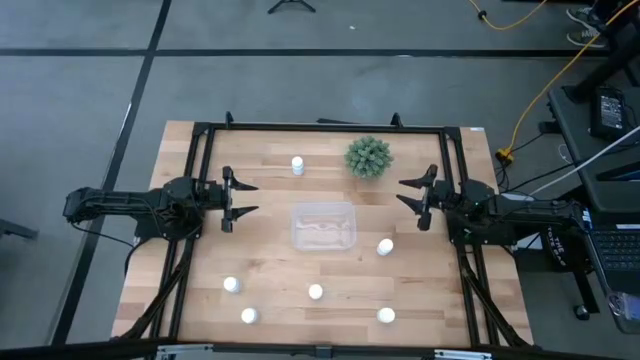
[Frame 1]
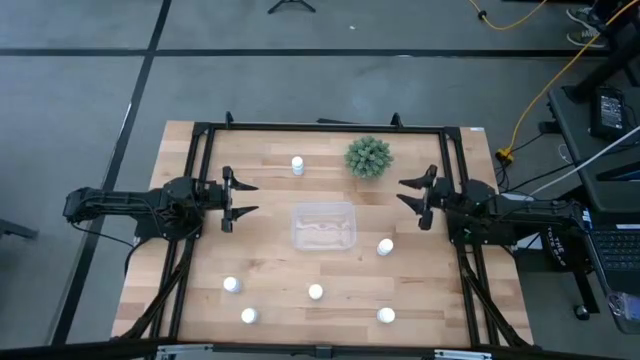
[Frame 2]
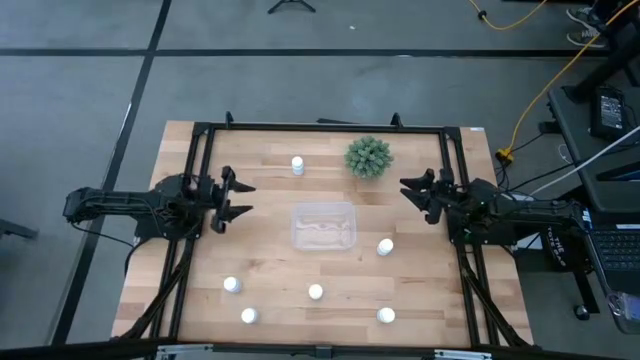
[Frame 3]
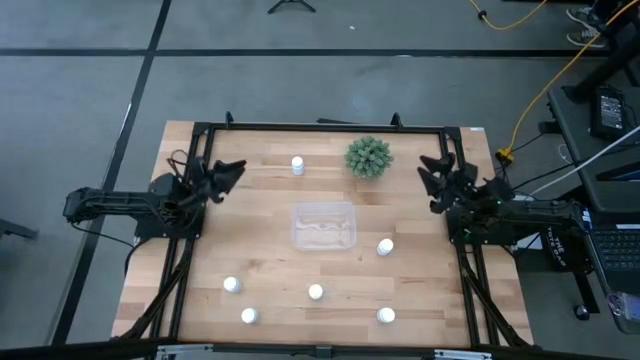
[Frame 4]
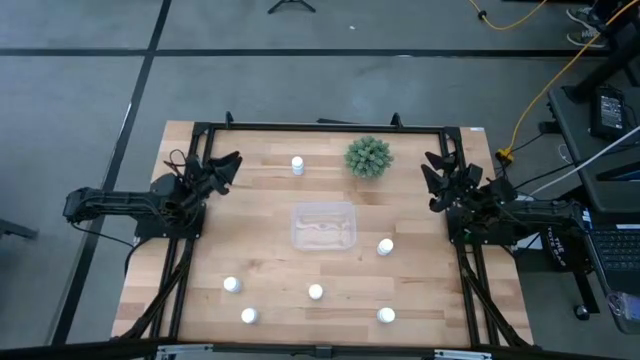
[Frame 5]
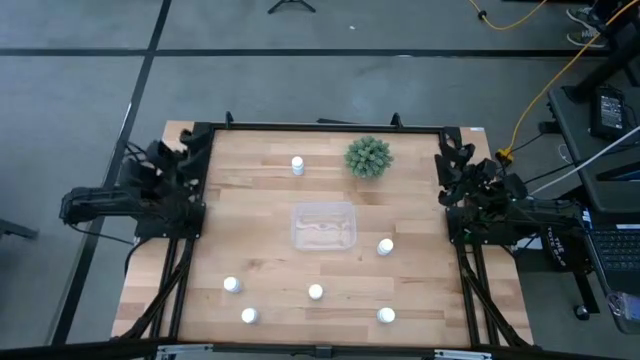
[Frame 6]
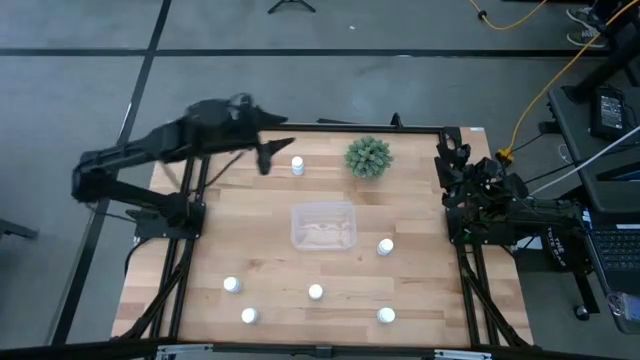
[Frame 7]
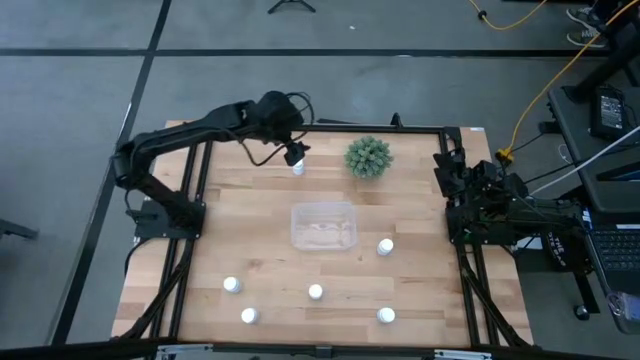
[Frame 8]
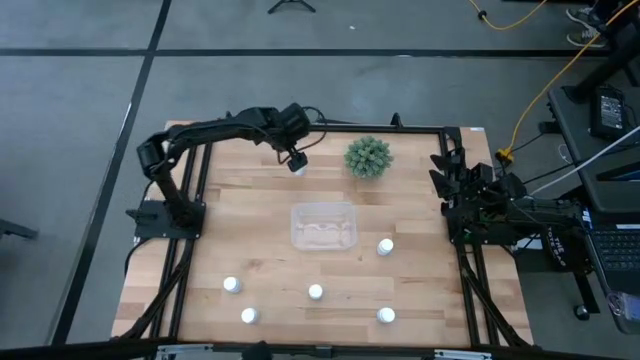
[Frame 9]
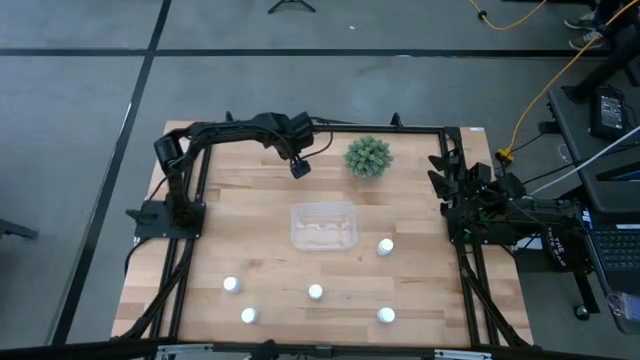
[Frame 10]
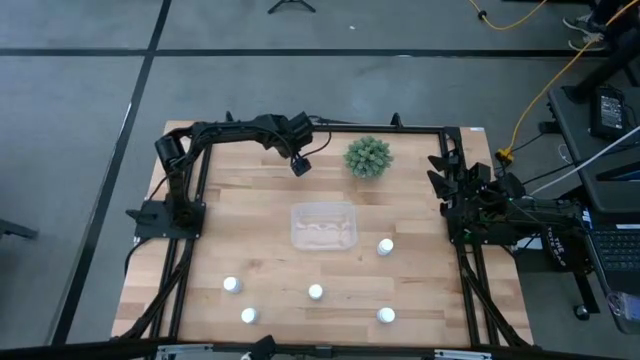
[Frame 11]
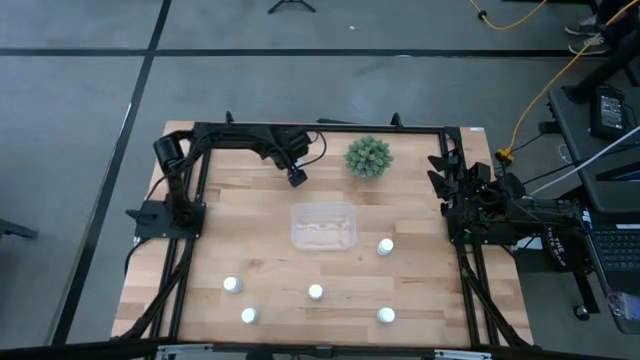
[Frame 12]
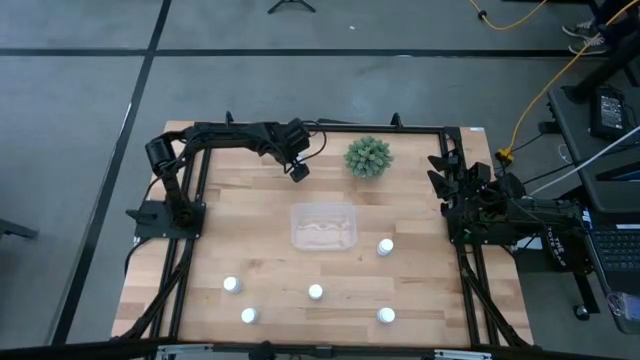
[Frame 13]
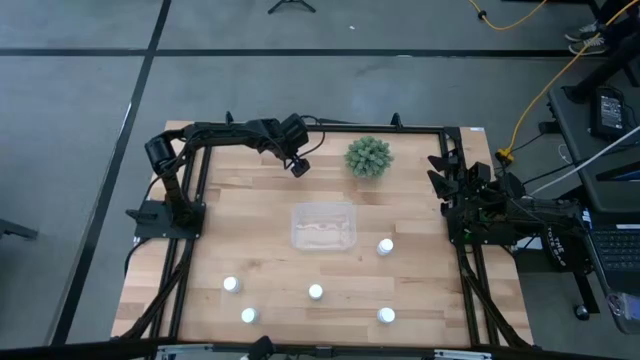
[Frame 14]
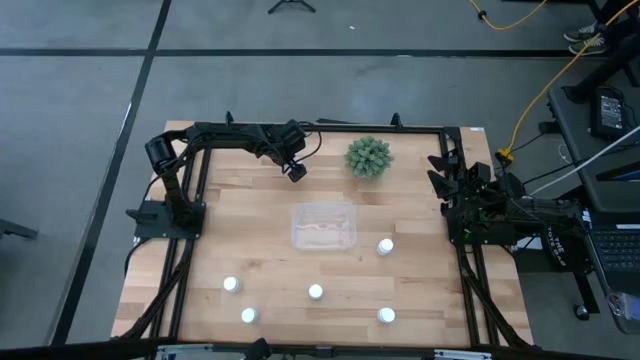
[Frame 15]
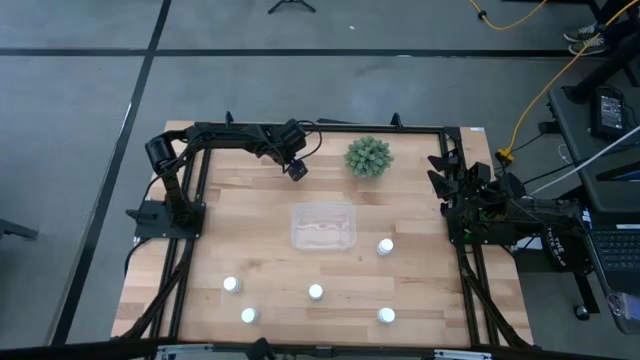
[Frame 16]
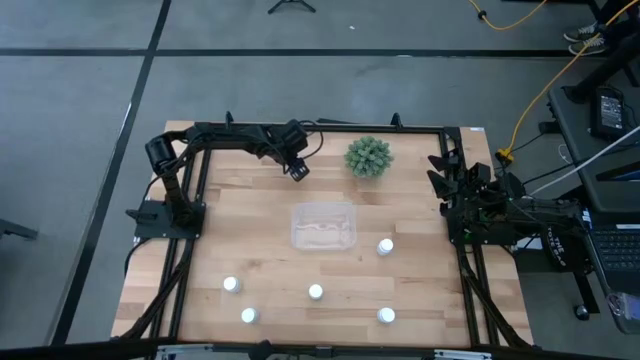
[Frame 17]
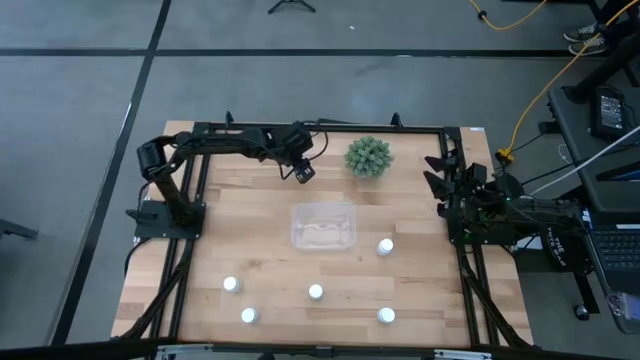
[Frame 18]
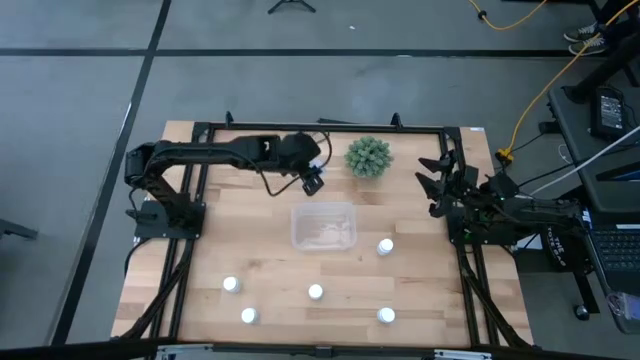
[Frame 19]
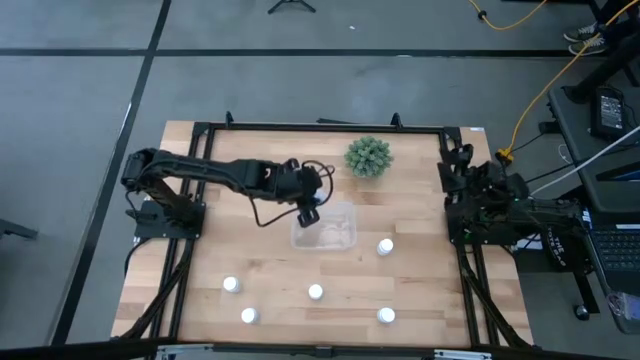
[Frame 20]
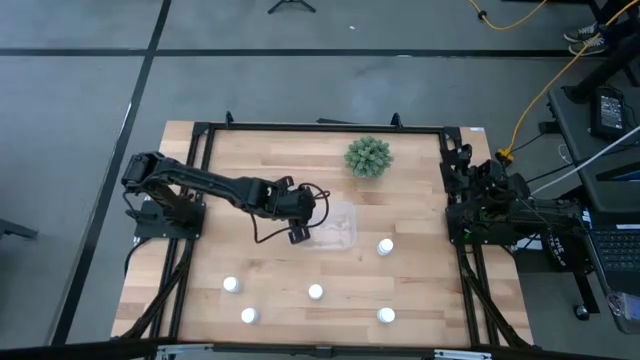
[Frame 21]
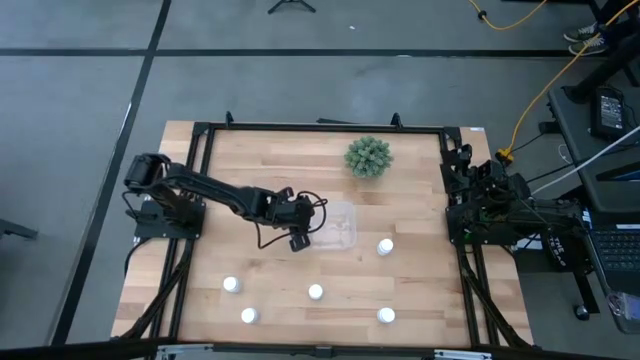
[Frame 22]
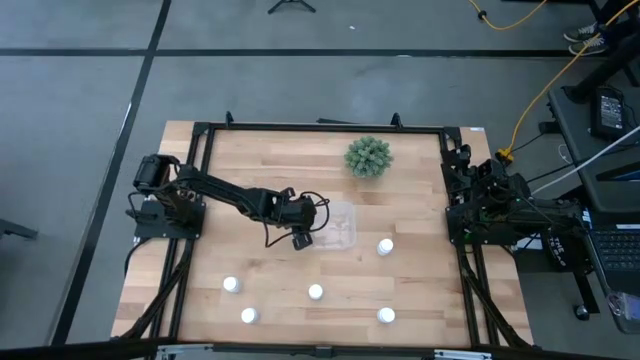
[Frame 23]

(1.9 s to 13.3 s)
Task: Pick and place pill bottles into a basket
Put the white pill bottle into the transparent bin

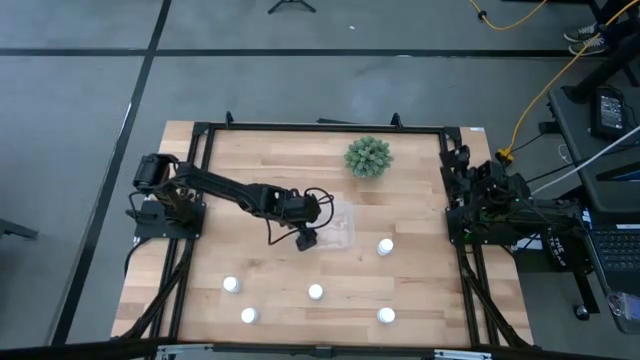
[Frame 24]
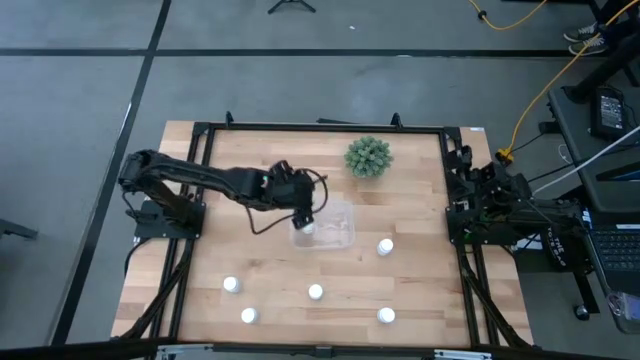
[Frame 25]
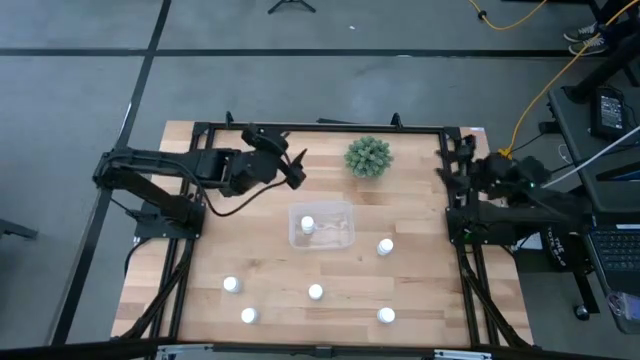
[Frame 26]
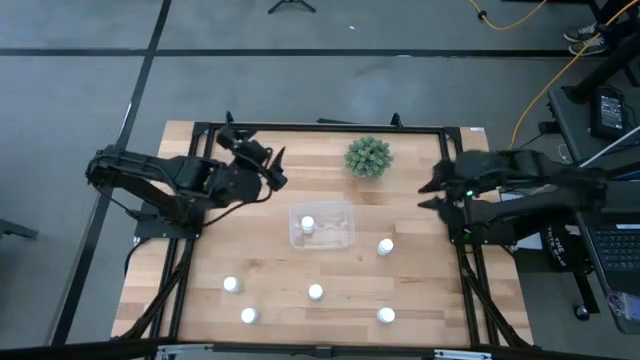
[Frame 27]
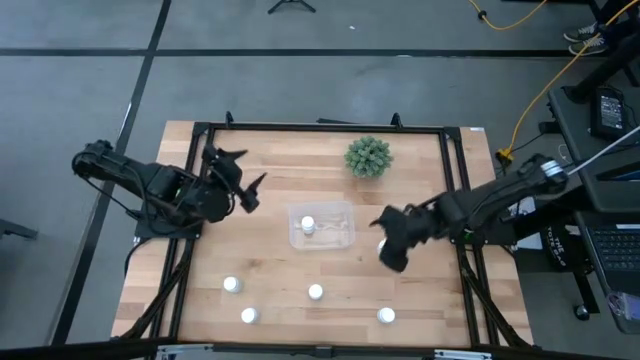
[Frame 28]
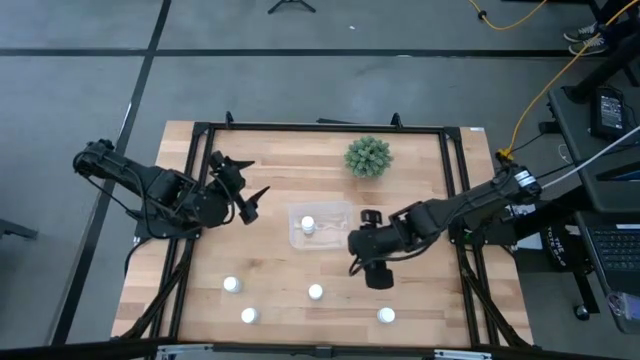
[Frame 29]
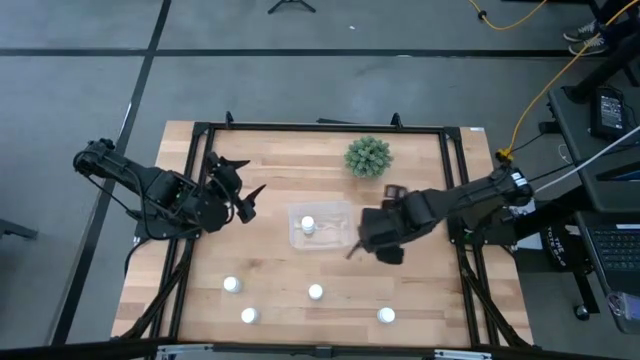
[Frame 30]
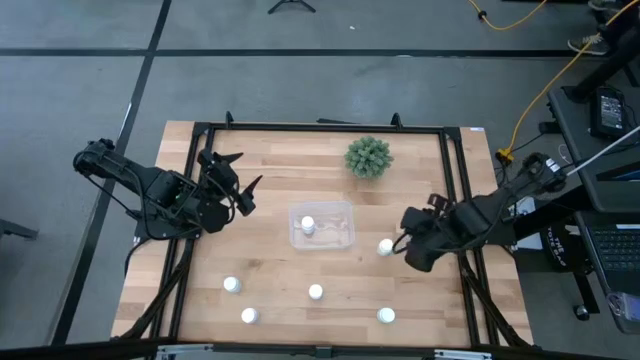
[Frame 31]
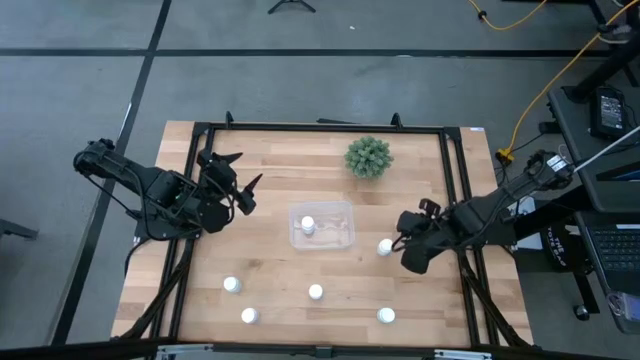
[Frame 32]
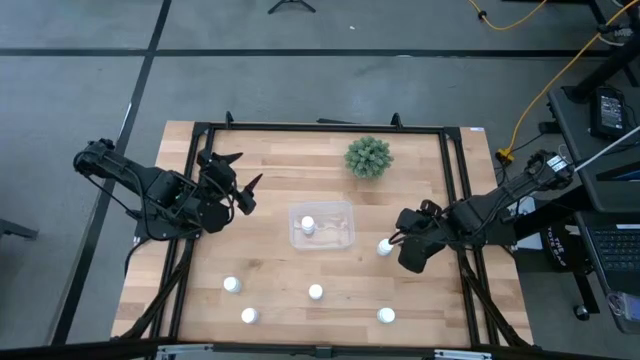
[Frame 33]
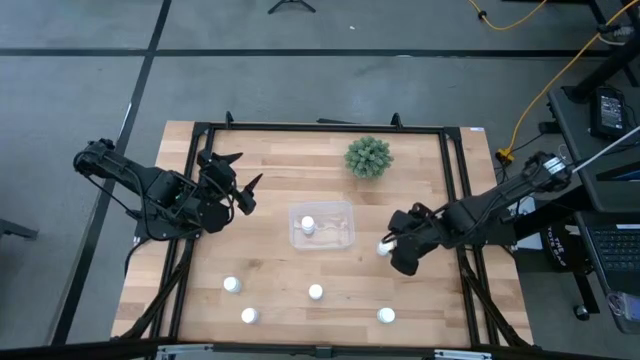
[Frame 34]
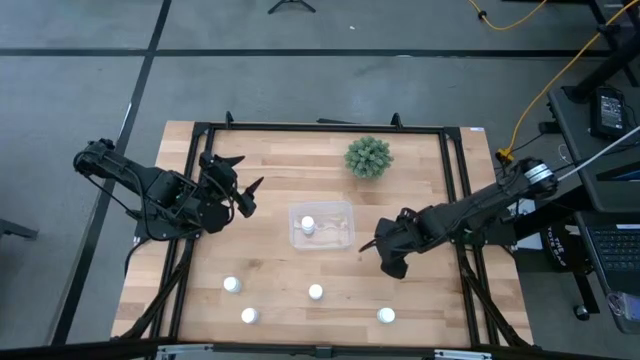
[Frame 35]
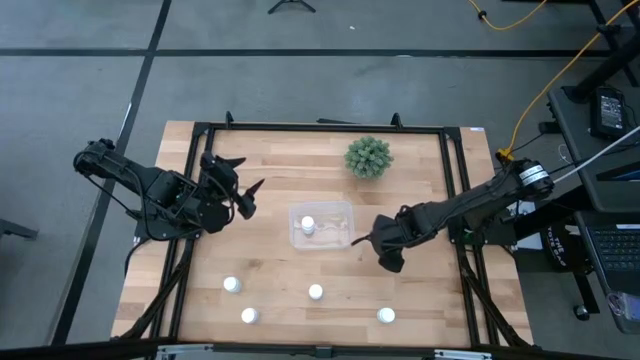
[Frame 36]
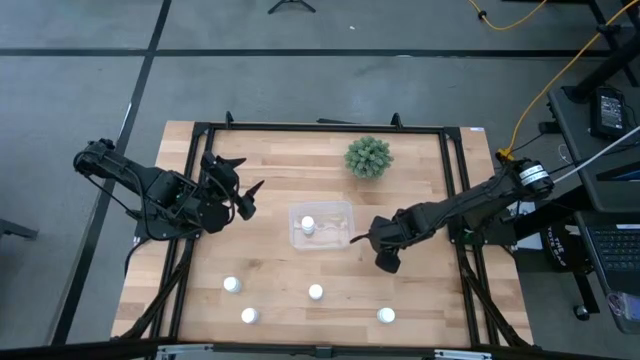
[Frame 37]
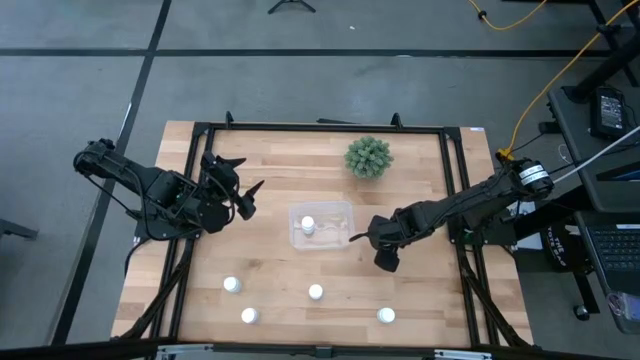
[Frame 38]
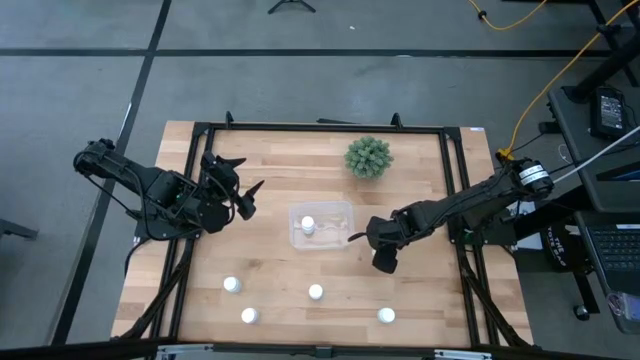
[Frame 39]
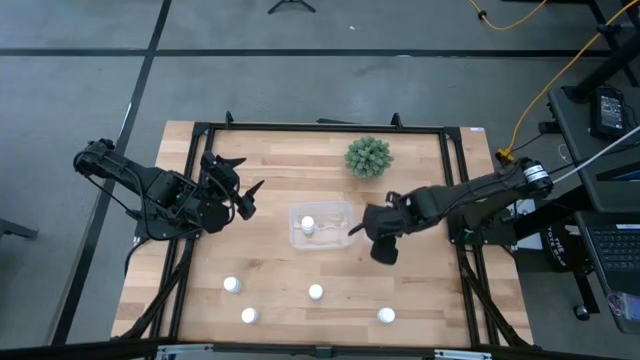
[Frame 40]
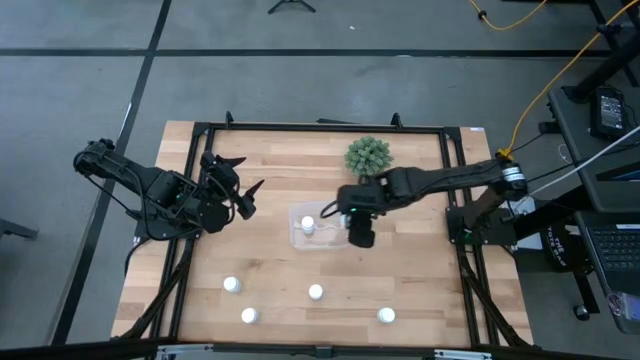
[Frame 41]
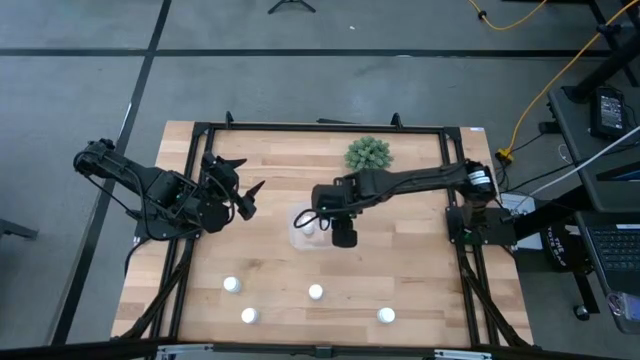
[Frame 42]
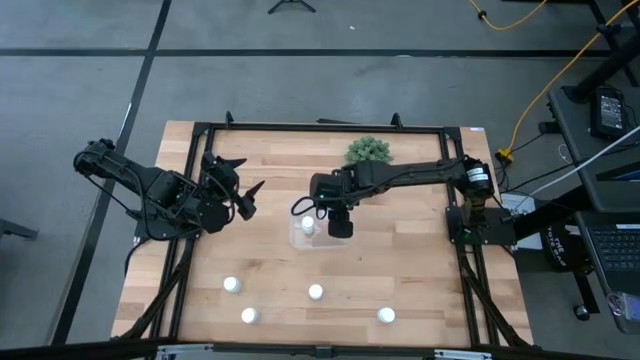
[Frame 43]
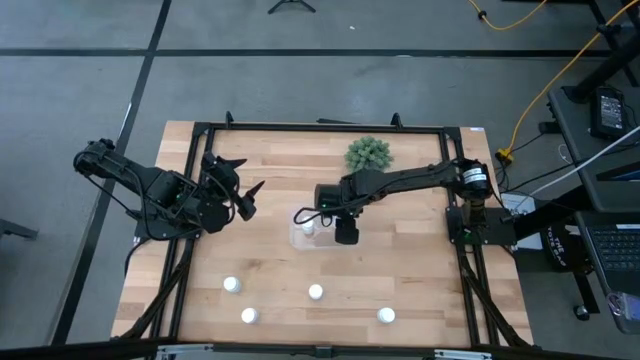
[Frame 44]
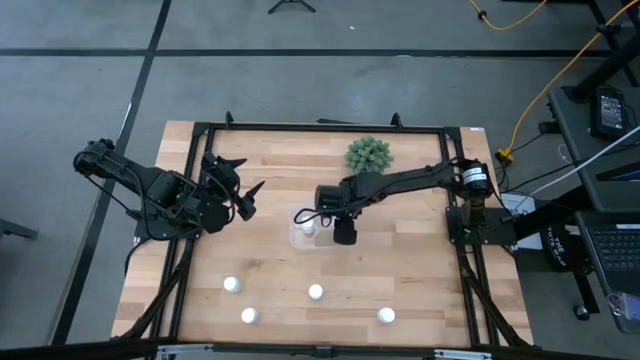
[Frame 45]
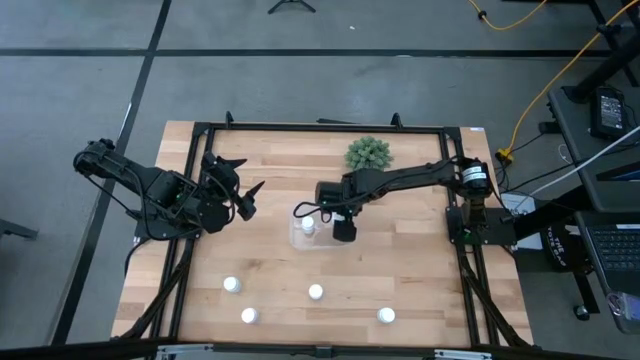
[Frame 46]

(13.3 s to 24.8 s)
Put the white pill bottle into the transparent bin
